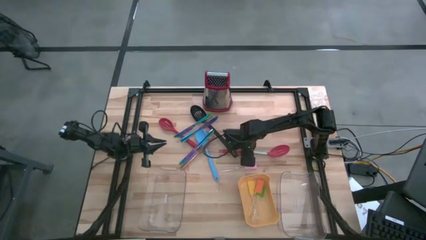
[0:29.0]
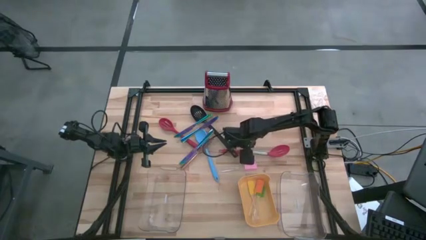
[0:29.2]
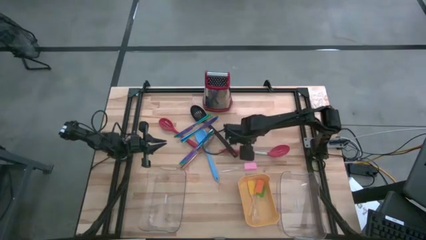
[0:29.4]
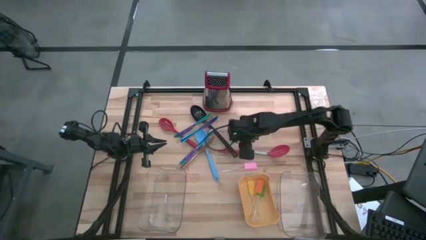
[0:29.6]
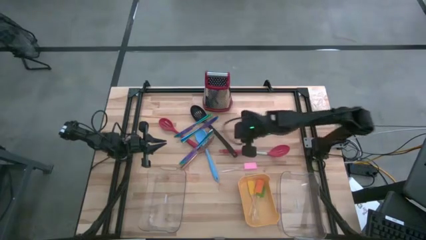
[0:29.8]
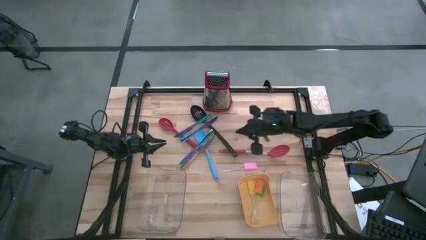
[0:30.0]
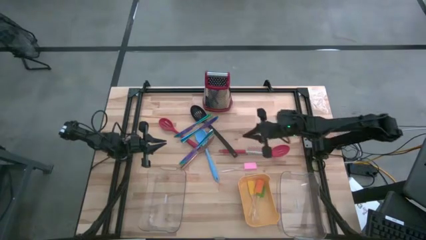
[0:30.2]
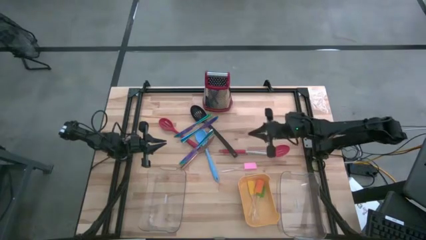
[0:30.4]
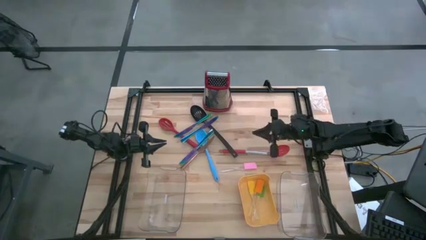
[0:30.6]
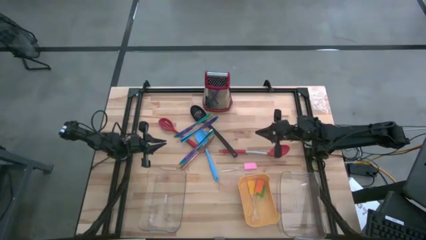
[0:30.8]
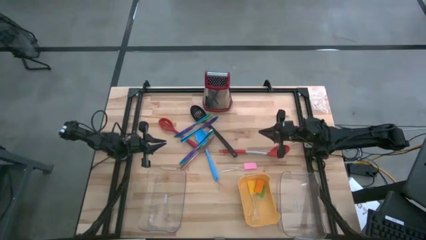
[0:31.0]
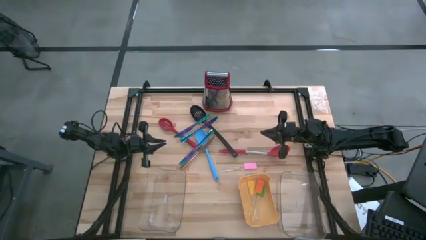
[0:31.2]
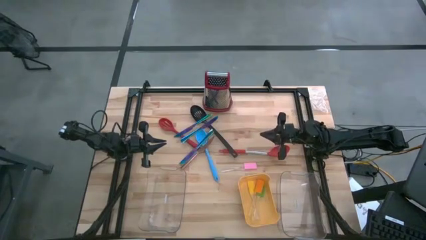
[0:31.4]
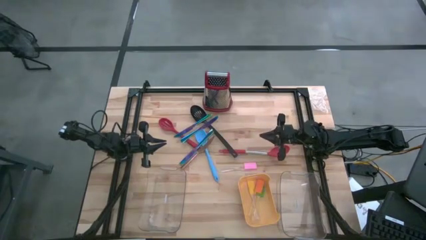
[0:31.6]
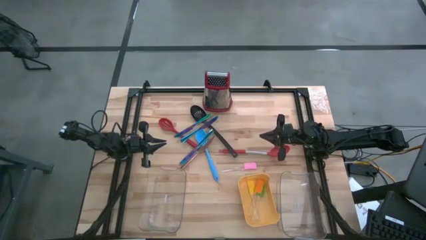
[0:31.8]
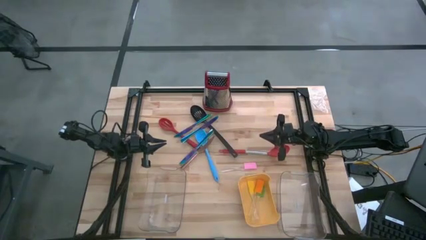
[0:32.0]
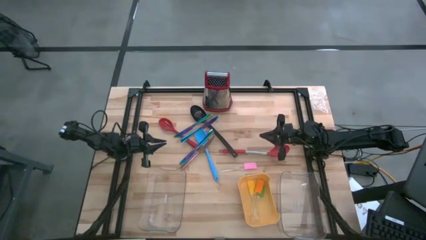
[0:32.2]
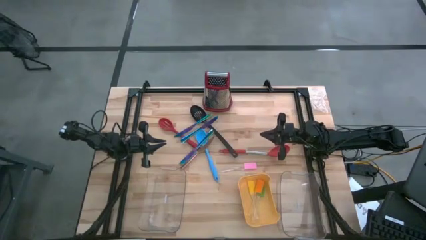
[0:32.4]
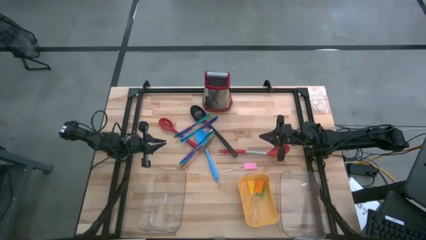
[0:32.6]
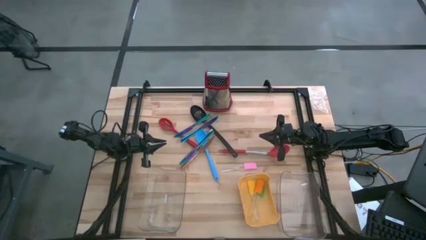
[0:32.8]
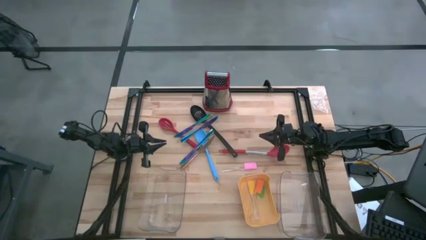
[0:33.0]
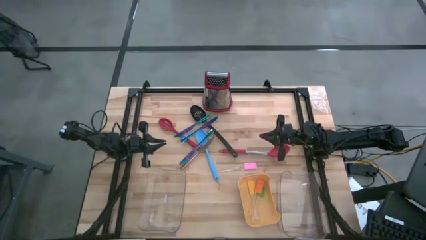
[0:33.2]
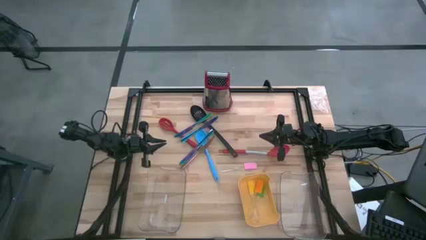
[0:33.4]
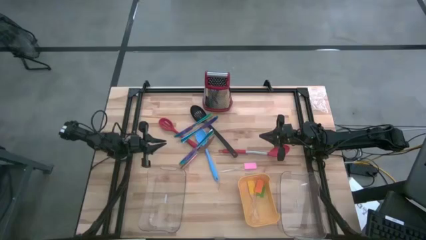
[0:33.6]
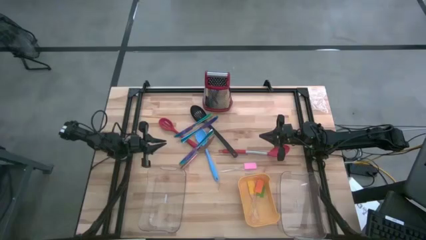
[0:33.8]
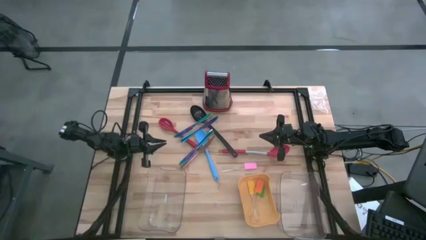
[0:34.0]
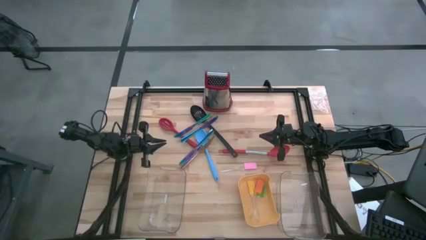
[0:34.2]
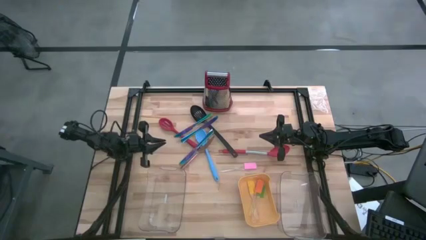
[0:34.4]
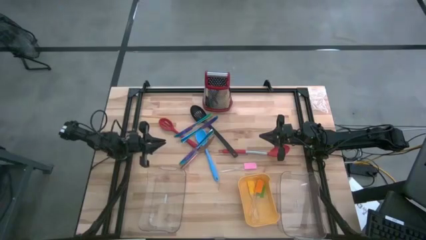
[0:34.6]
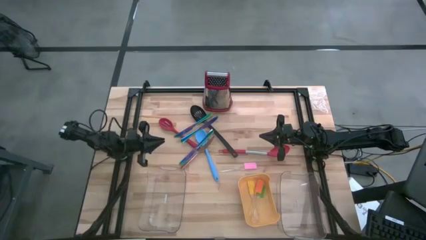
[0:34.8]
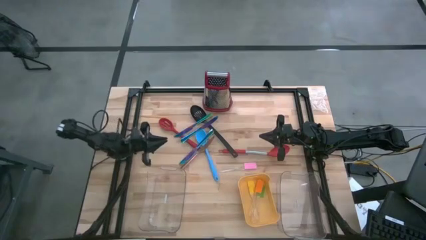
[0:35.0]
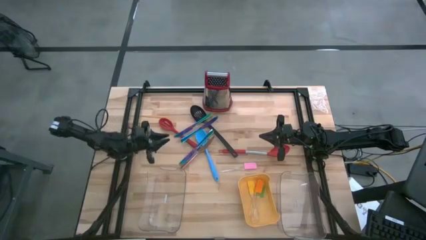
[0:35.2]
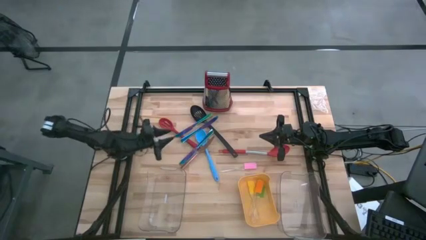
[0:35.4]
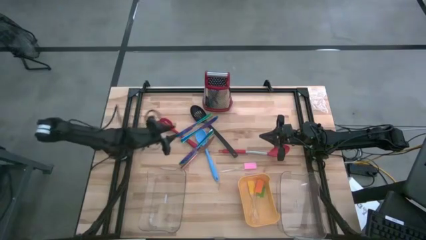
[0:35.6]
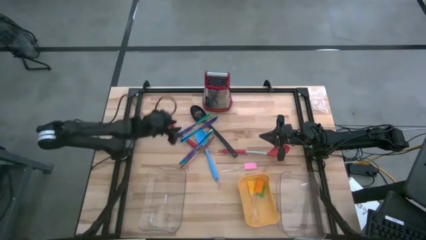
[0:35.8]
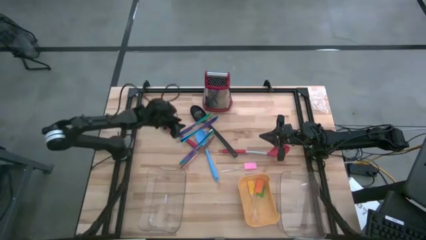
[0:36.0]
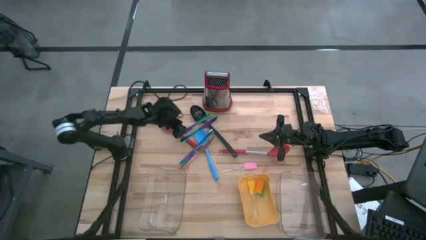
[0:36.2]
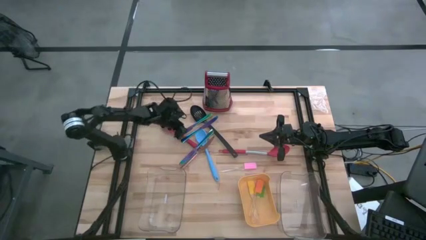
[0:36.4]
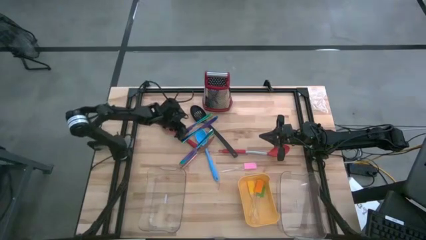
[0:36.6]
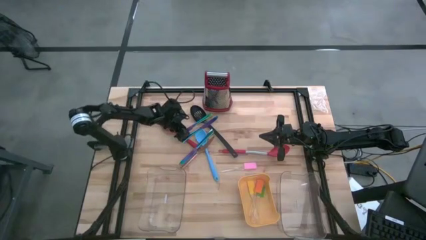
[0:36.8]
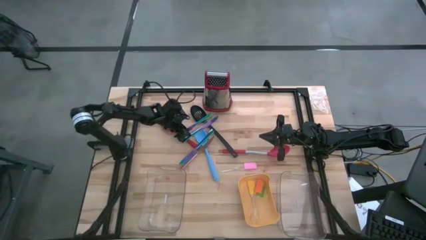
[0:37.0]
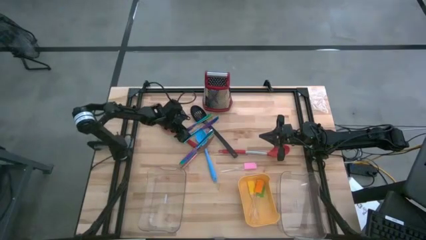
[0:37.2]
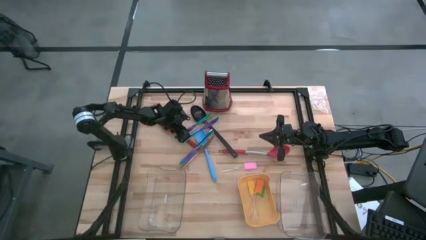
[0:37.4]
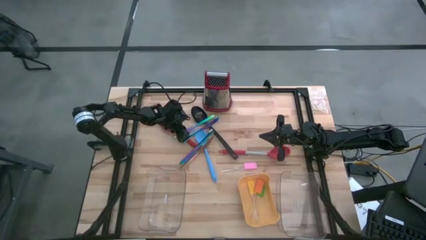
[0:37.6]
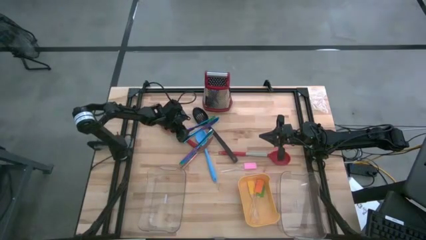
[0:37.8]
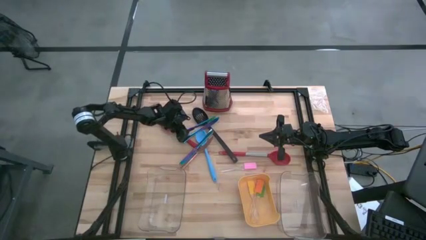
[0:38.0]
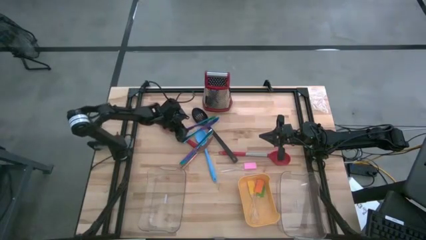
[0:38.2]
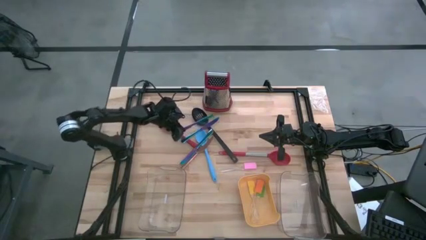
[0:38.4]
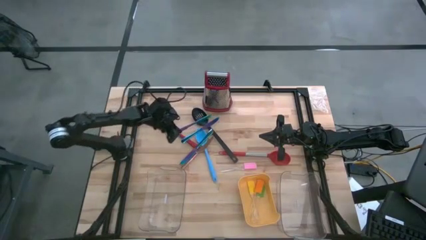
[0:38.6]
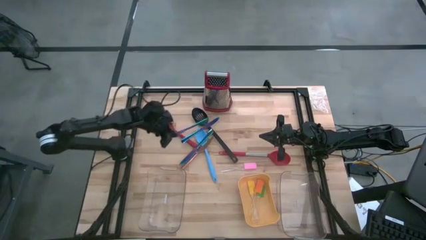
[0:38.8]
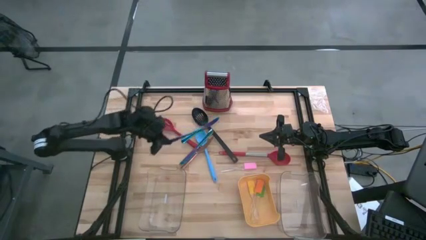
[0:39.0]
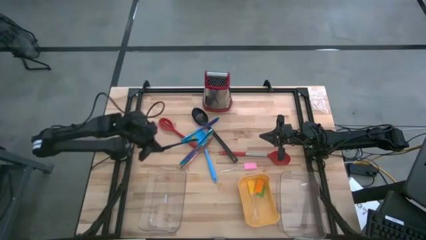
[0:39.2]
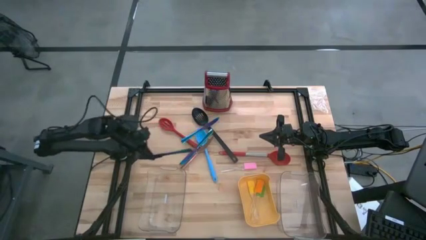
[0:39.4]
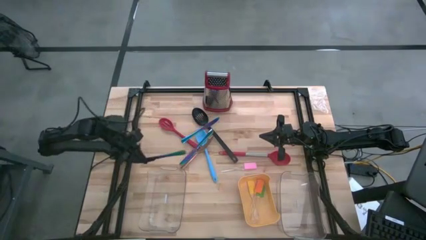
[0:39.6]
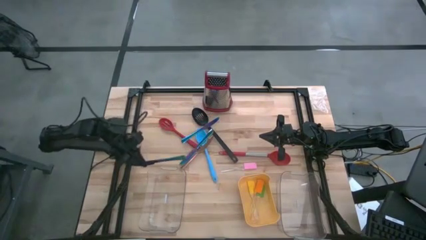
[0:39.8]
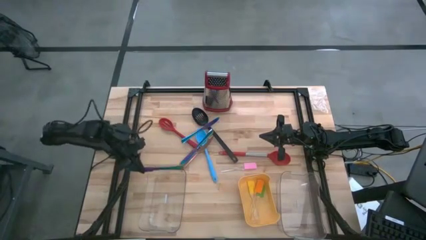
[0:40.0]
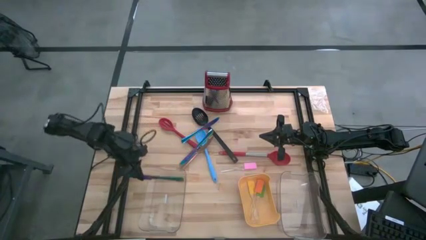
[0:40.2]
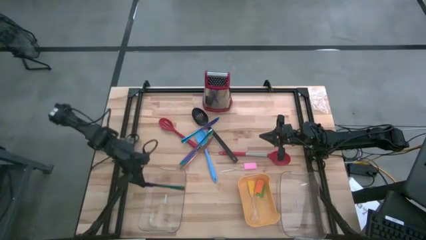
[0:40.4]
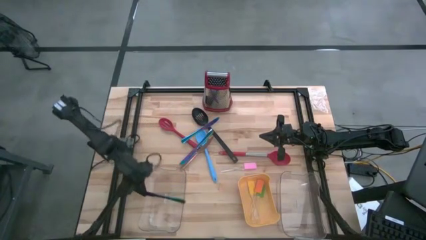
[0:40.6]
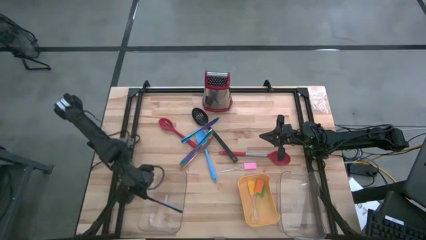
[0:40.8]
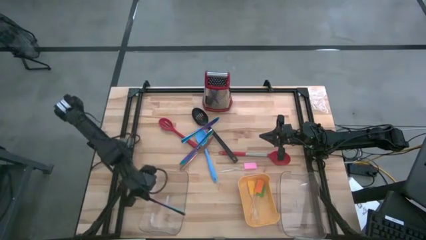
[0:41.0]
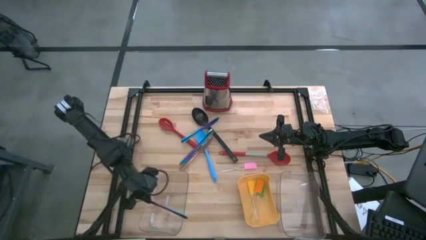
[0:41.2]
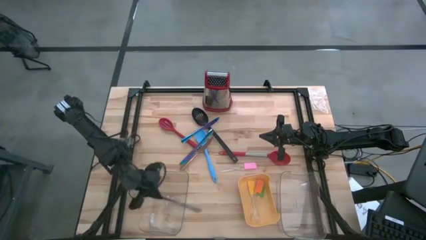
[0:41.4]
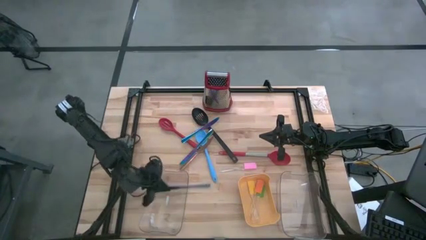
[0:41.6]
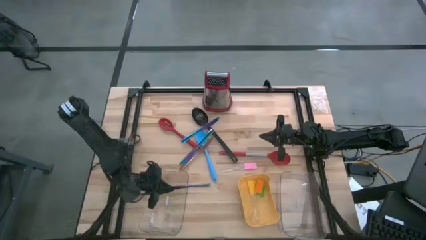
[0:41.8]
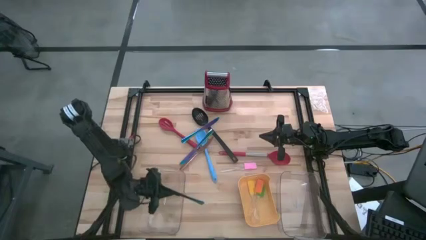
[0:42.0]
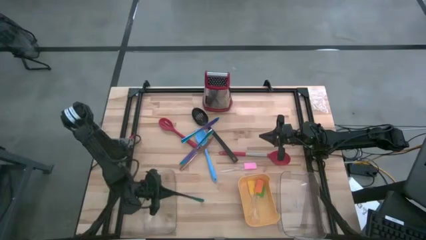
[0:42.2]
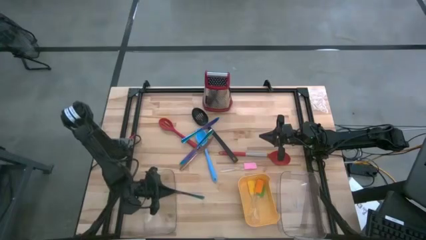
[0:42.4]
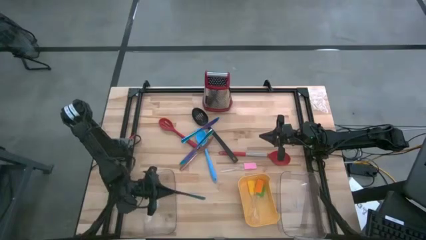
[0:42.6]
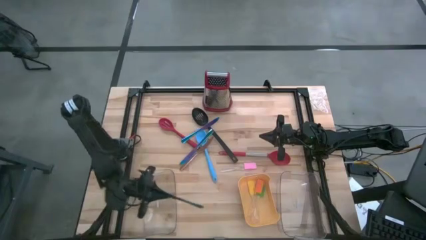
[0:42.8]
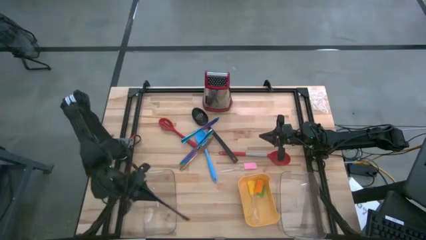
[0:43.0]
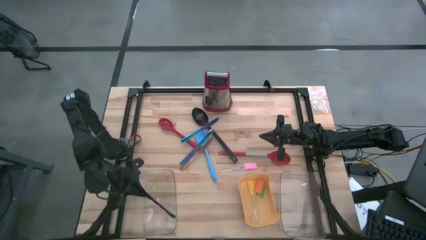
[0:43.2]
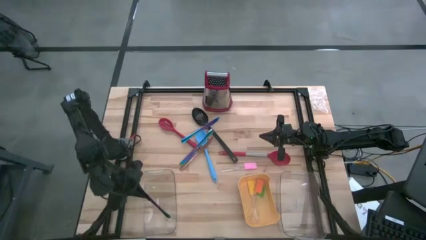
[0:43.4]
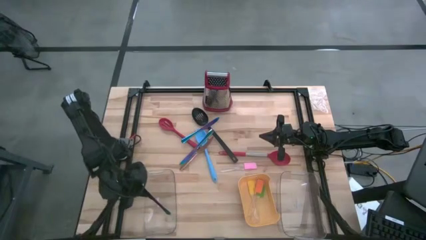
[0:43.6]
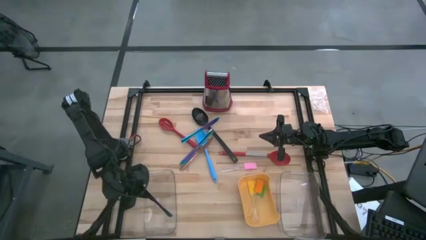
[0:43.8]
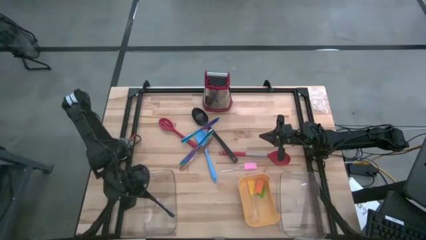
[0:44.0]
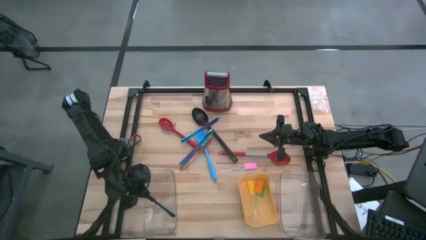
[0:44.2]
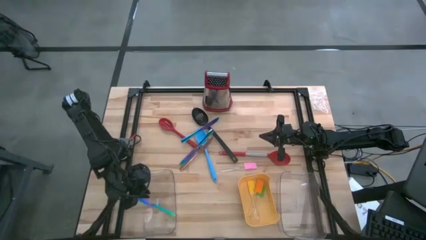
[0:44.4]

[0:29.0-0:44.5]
Task: Pick & Place Kitchen Items
Put the top iridescent knife into the left transparent bin

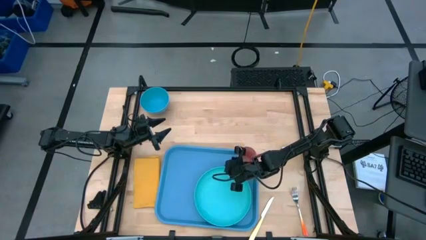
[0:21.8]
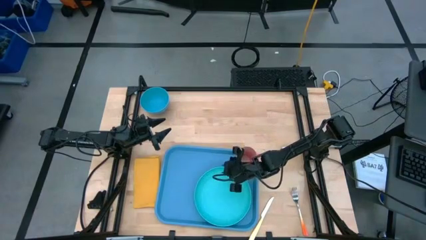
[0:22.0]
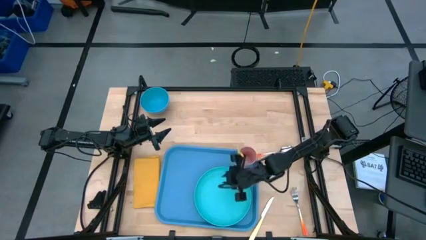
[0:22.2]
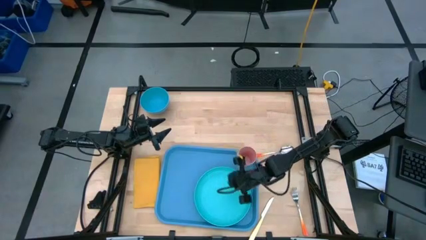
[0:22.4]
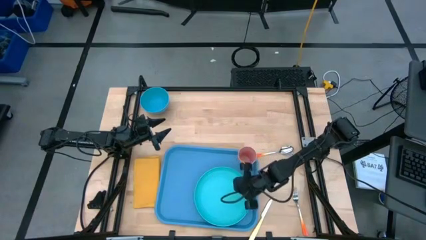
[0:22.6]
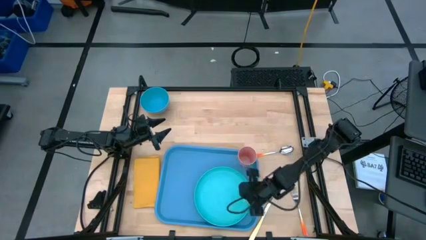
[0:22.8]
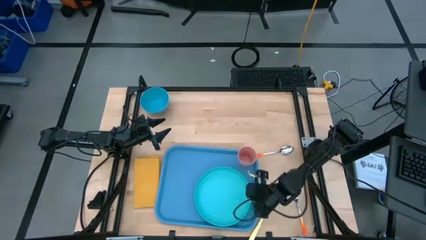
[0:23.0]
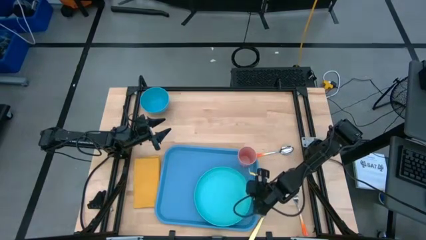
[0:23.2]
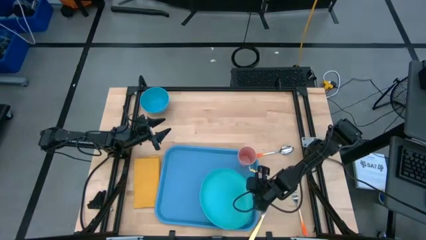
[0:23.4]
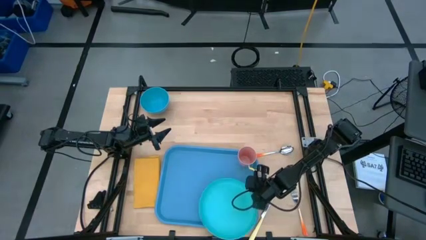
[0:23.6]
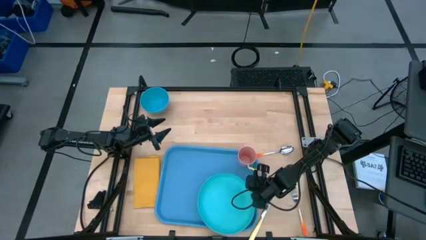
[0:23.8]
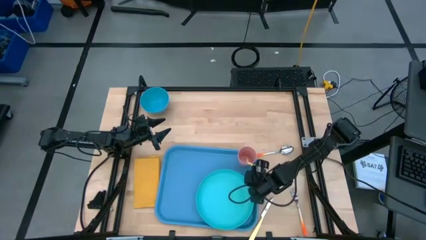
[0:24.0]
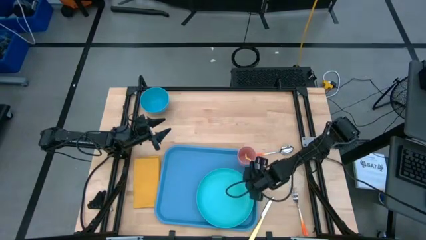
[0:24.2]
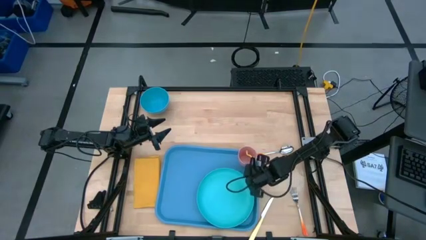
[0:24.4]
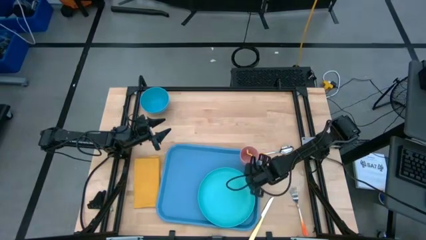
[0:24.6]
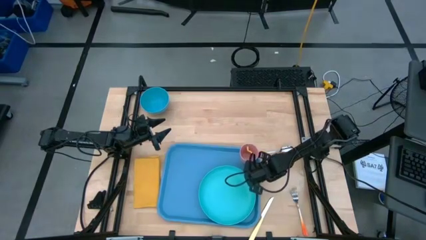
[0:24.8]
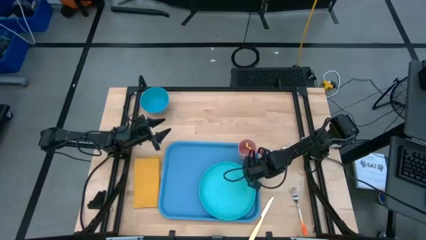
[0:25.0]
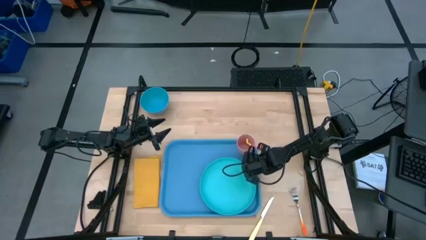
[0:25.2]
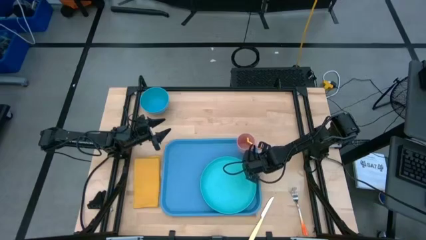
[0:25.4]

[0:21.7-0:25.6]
Task: Set up tray
Adjust the blue serving tray on the table
